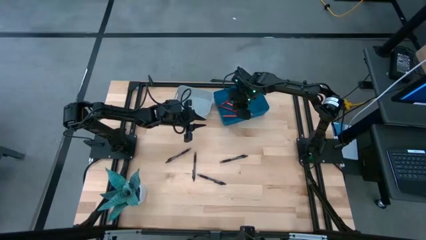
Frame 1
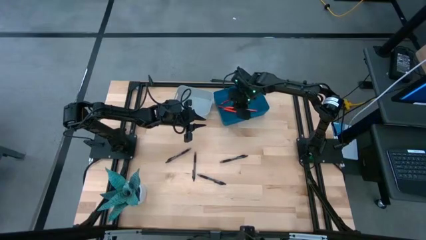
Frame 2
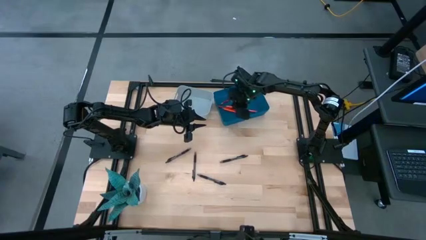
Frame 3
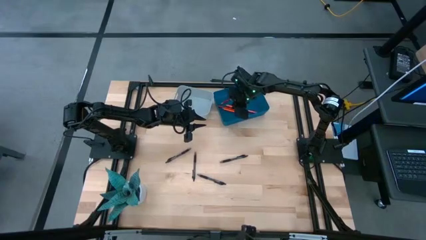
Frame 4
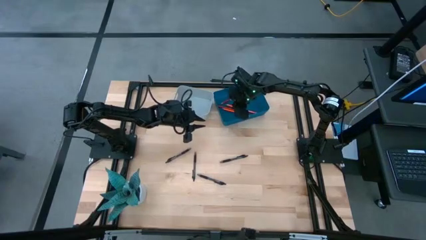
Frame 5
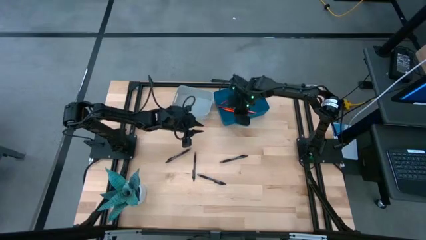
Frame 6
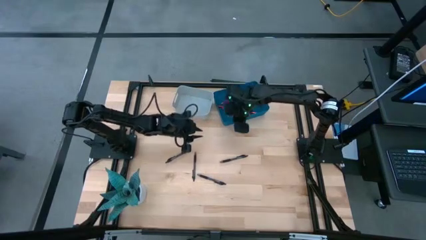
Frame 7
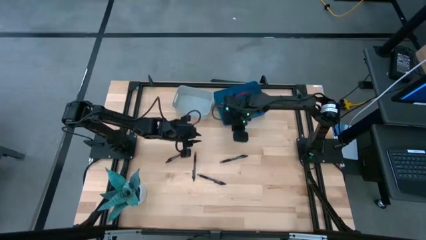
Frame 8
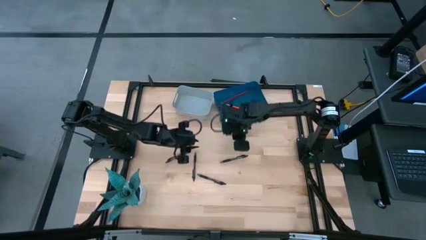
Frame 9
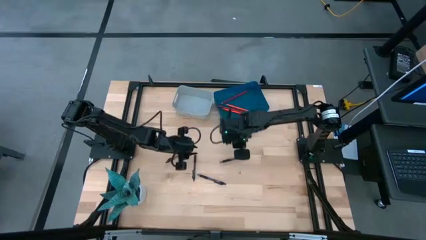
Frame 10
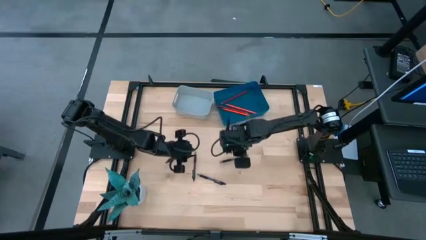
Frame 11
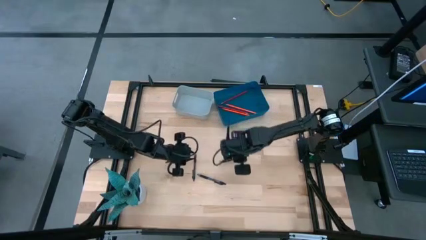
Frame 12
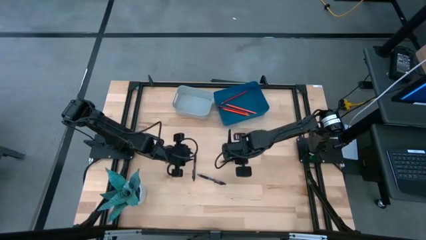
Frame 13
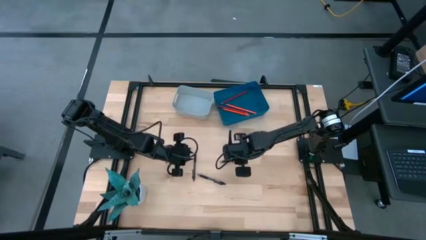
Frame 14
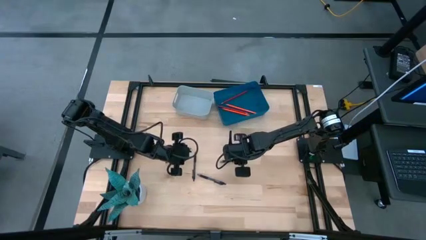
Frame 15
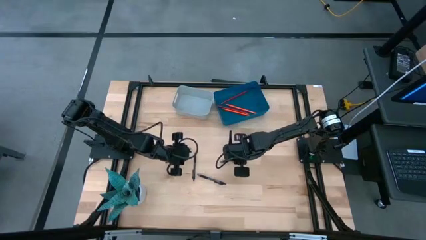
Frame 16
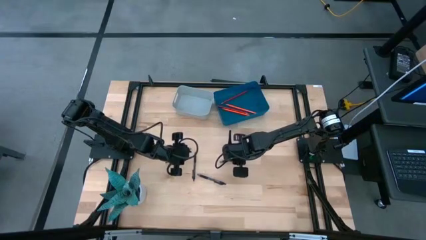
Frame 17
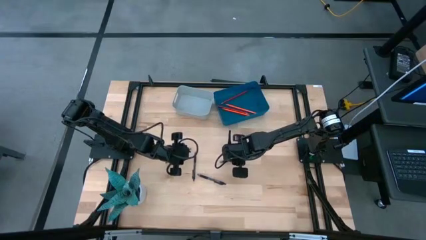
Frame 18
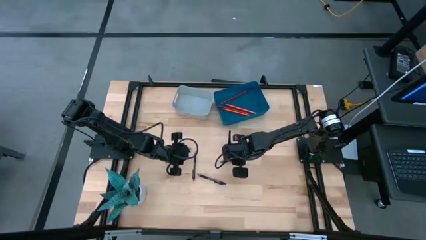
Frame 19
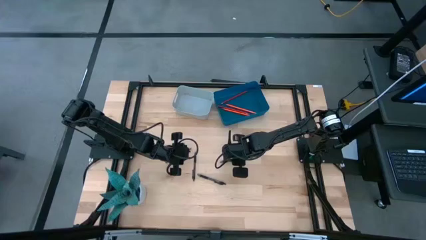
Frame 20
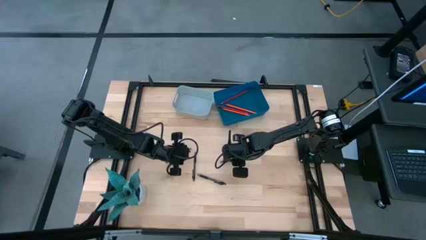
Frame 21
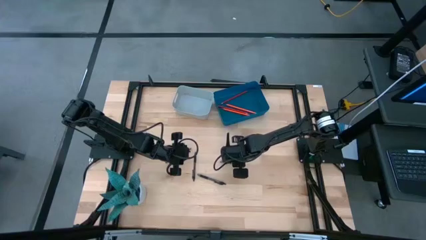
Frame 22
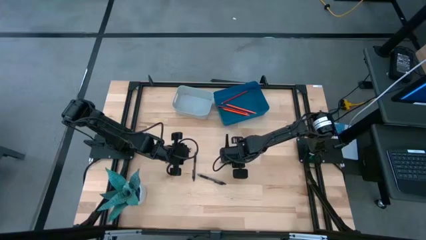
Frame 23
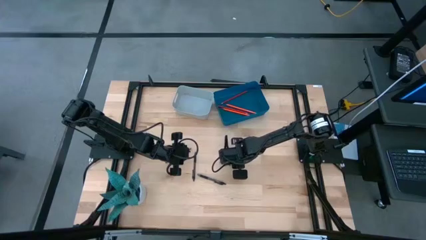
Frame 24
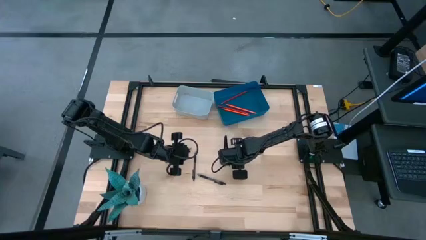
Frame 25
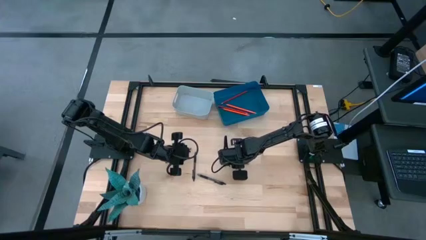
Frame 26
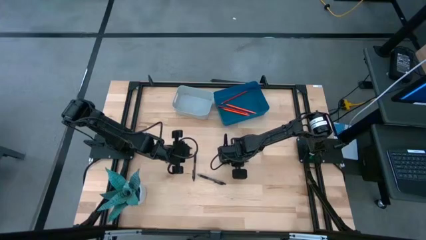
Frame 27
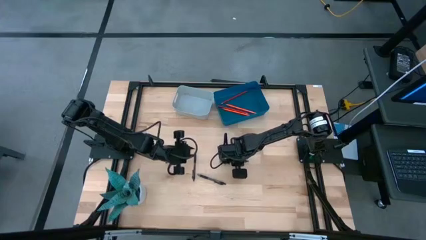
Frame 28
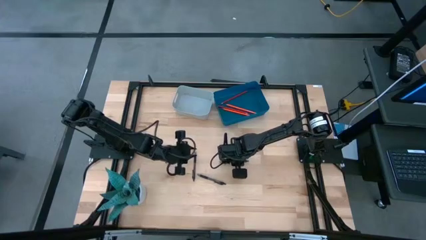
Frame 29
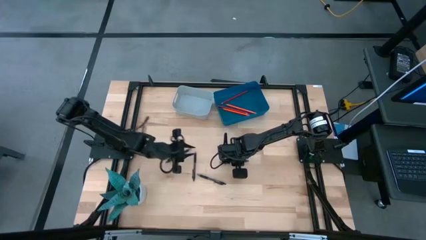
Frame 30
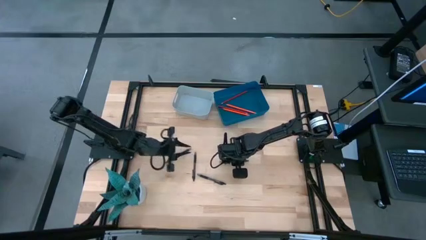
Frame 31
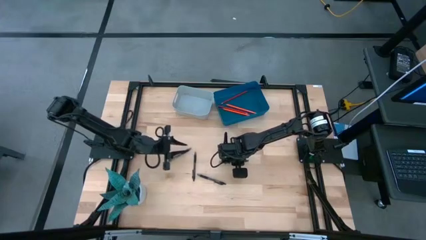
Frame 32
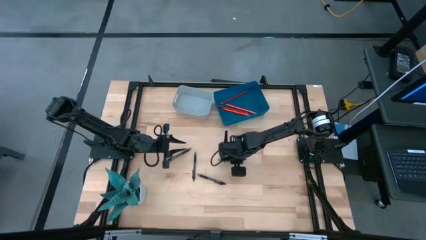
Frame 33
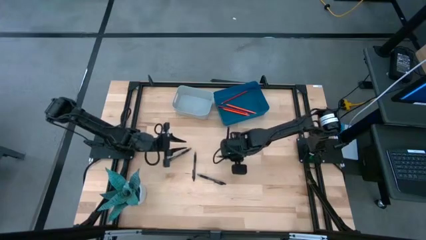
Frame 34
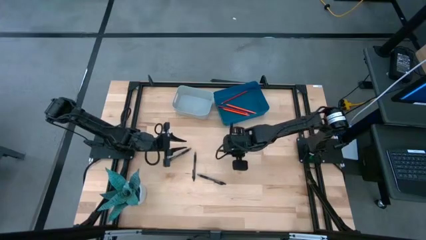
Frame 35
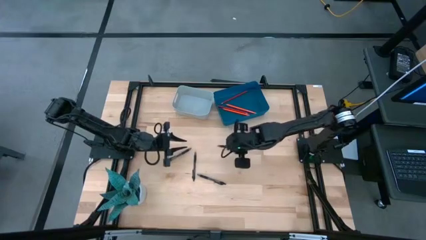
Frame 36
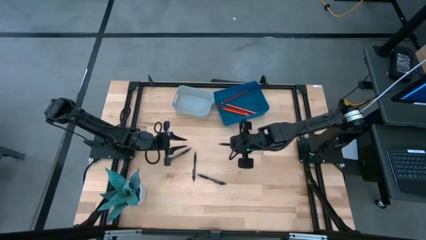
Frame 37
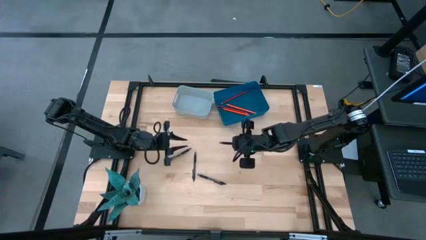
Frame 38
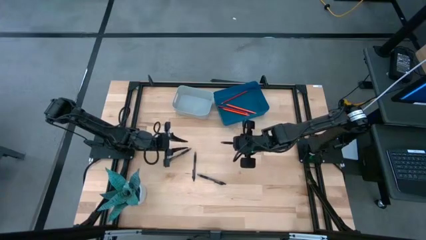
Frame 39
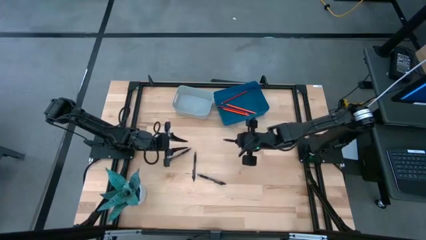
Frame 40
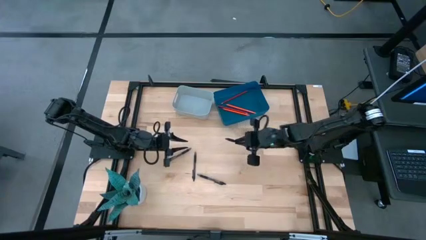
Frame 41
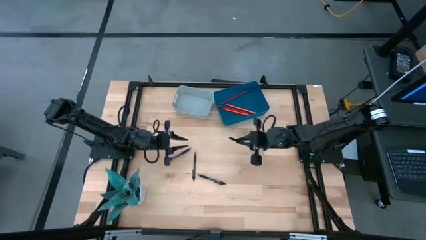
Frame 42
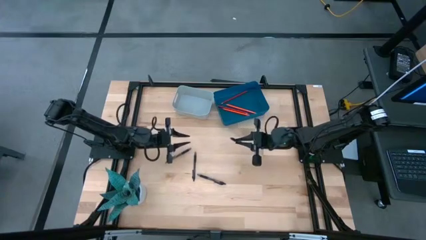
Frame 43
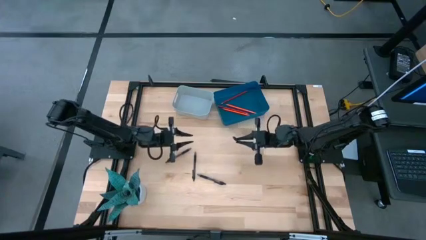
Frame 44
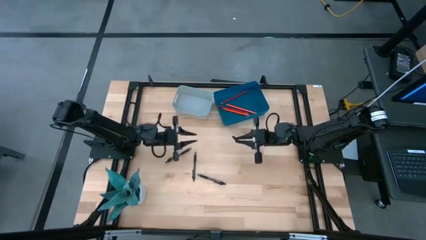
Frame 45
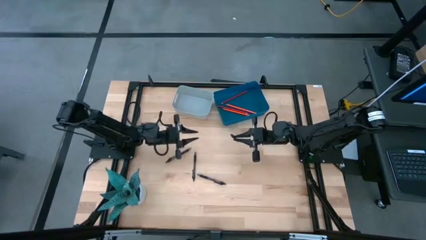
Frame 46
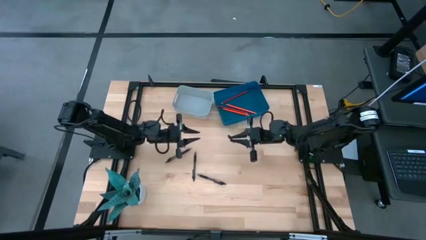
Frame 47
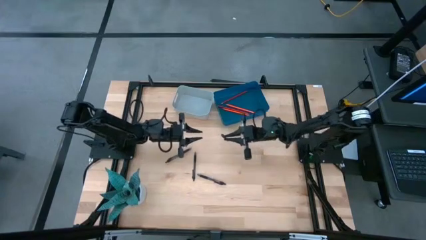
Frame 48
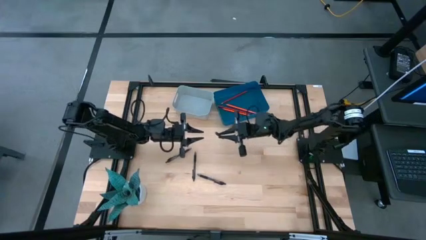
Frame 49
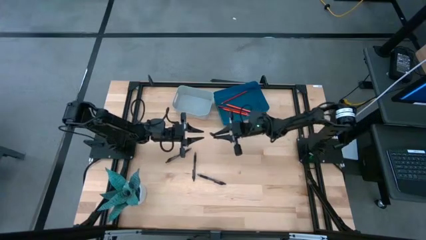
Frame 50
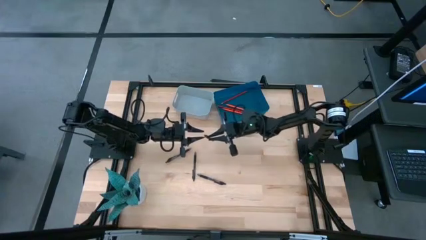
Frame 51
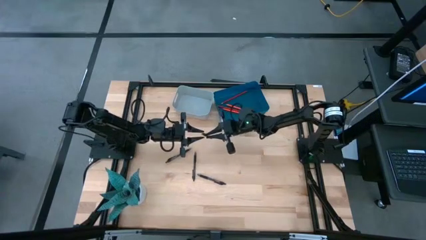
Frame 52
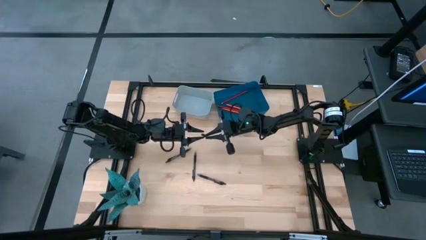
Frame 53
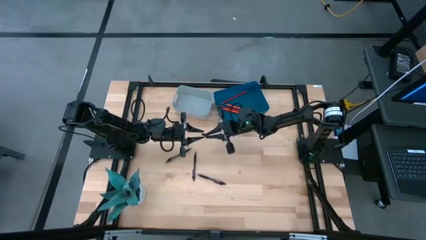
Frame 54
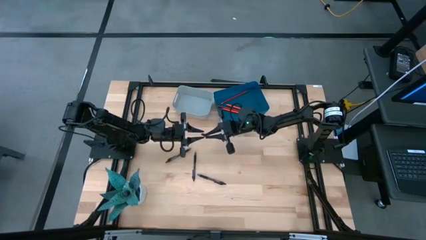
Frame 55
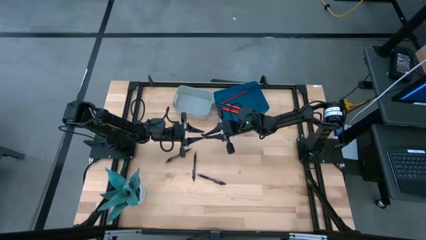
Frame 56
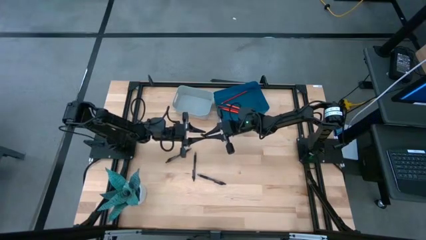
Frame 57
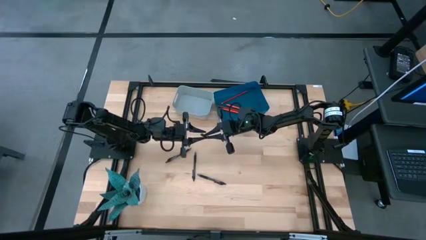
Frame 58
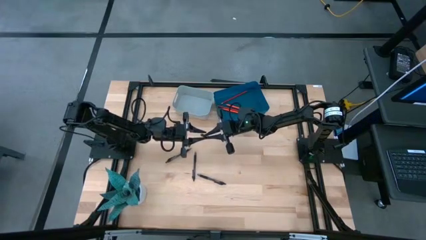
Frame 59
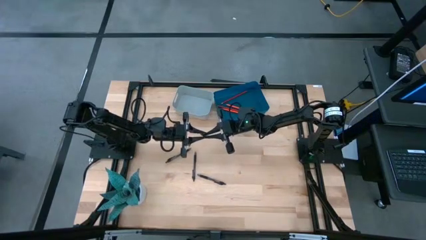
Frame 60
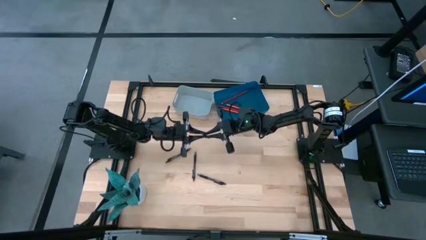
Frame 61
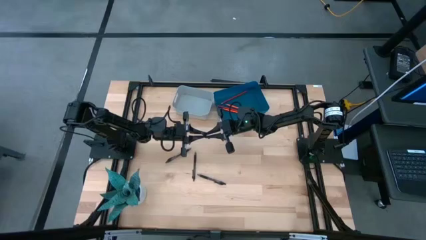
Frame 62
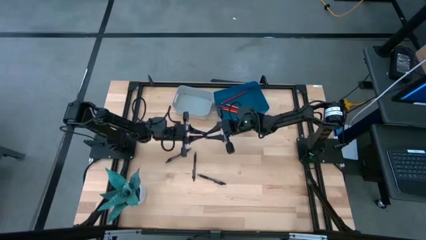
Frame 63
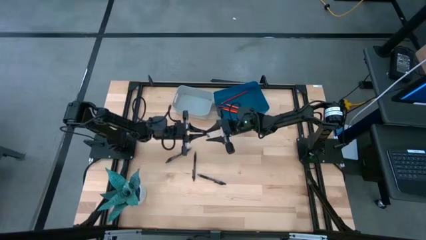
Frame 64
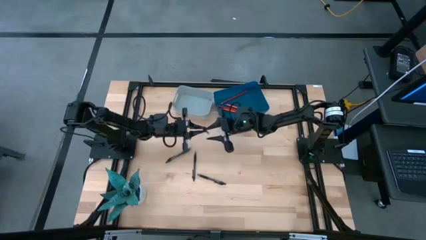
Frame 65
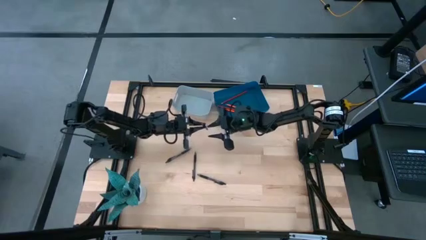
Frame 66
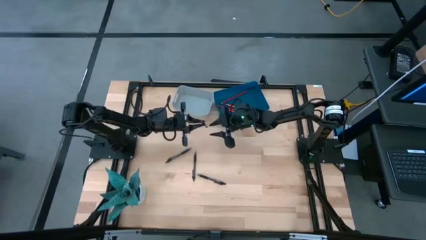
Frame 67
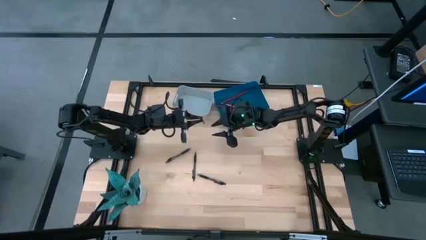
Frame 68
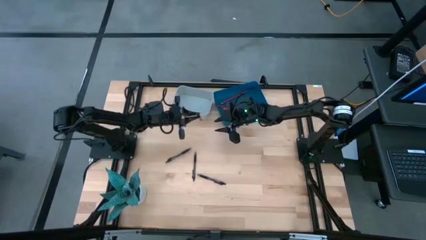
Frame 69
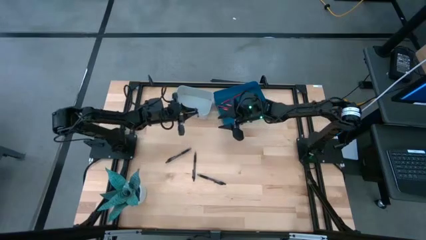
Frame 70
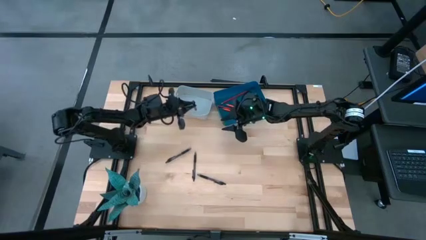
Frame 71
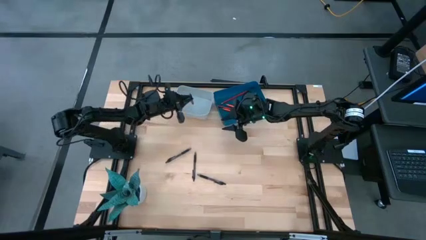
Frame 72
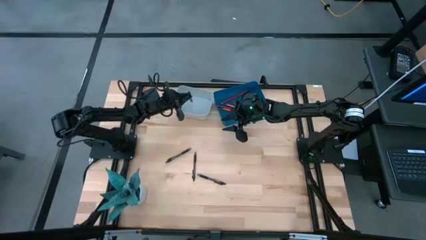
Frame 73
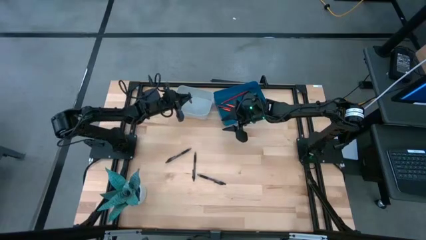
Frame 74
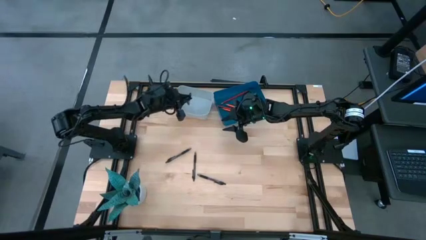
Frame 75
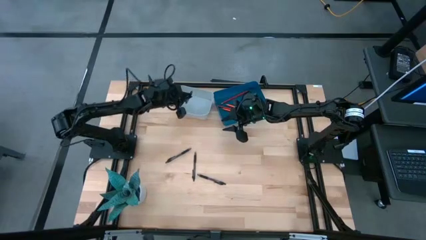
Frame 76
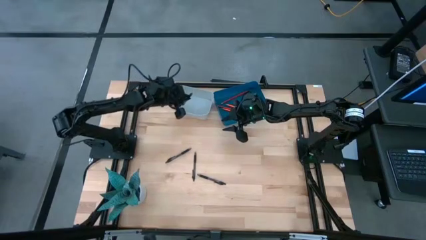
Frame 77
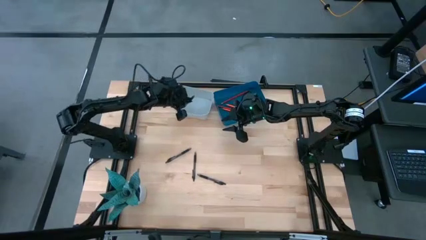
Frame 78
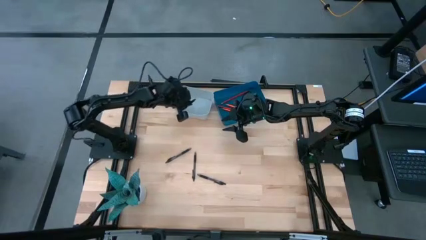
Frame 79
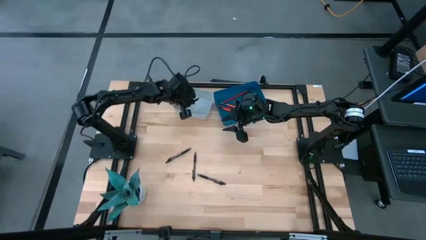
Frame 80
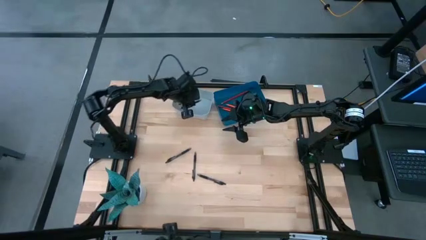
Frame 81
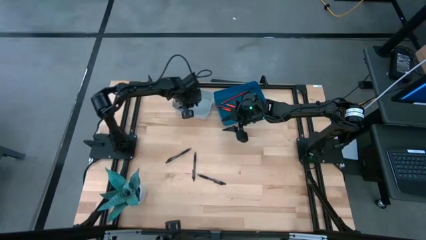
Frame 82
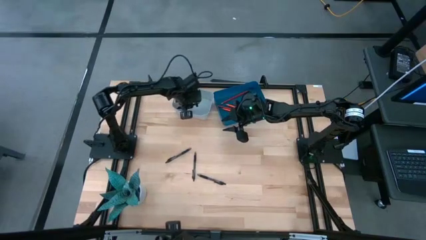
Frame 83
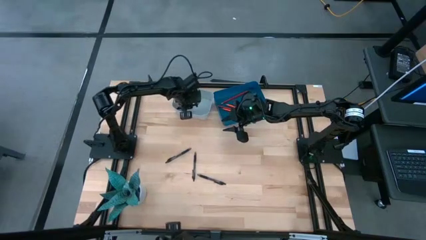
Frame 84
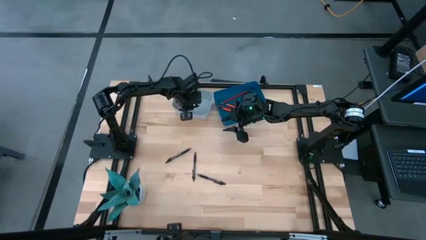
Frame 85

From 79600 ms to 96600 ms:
Task: Sort pens & pencils
Put the black pen into the gray bin
